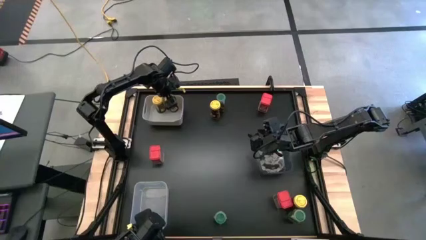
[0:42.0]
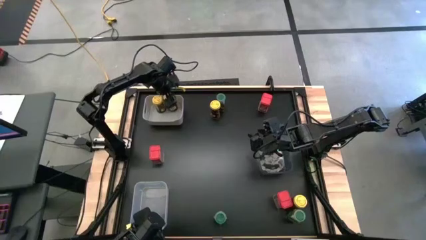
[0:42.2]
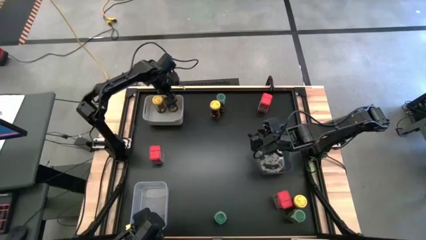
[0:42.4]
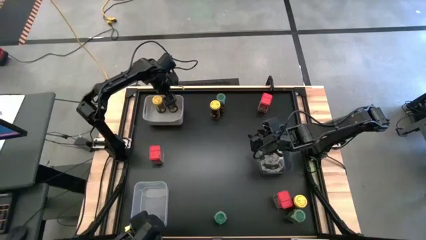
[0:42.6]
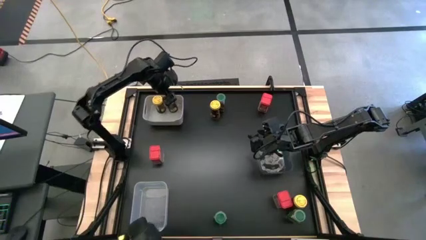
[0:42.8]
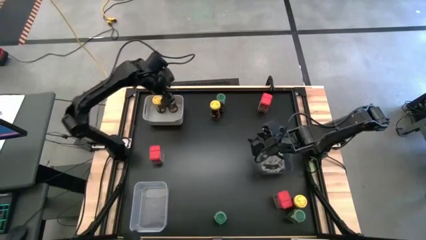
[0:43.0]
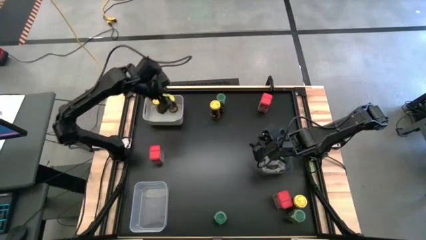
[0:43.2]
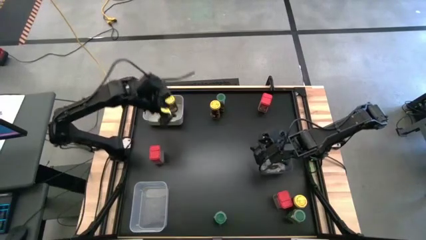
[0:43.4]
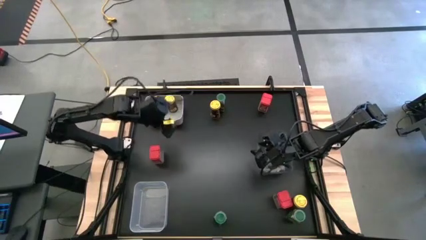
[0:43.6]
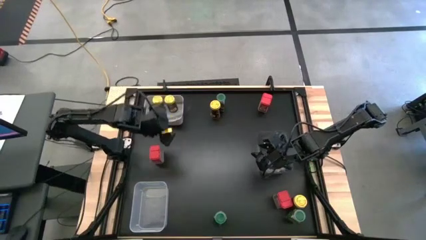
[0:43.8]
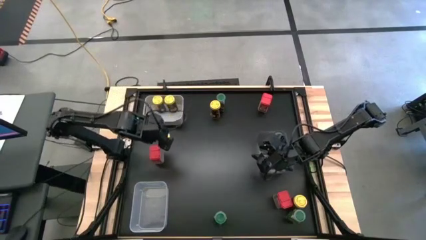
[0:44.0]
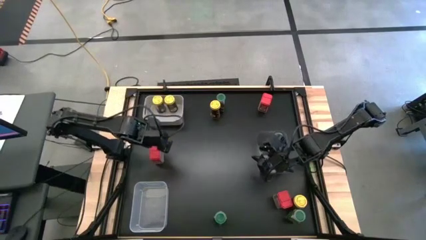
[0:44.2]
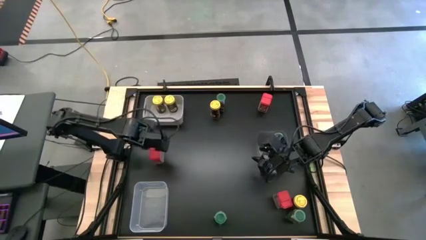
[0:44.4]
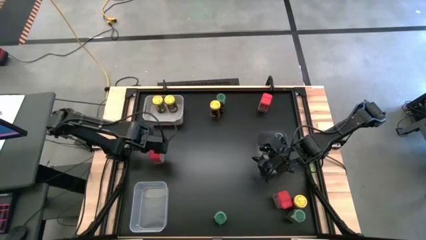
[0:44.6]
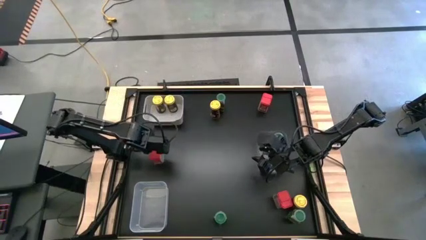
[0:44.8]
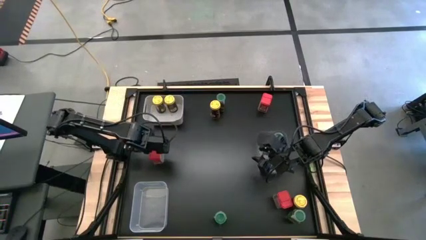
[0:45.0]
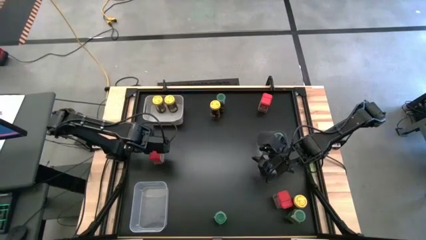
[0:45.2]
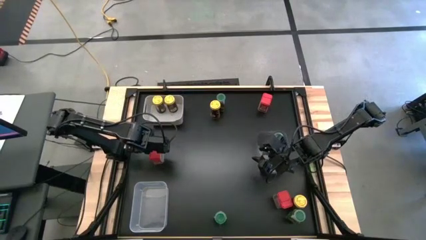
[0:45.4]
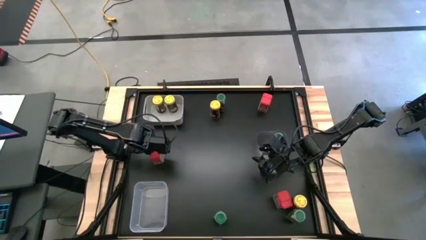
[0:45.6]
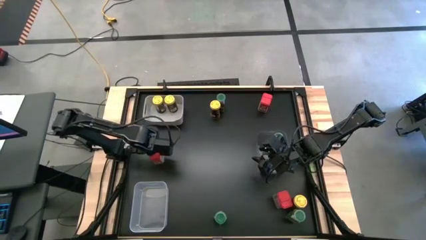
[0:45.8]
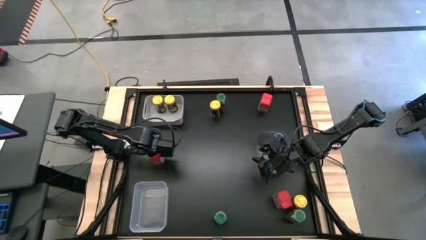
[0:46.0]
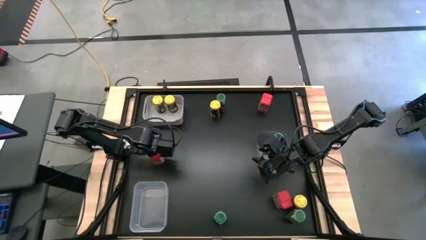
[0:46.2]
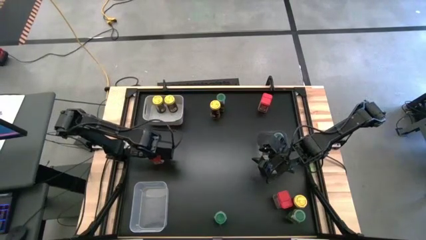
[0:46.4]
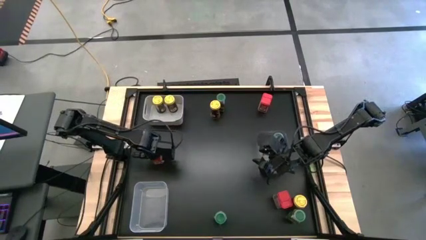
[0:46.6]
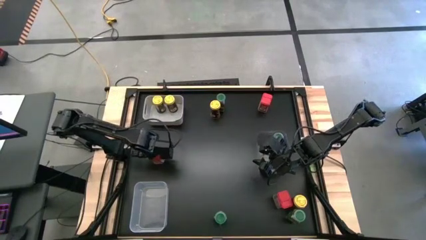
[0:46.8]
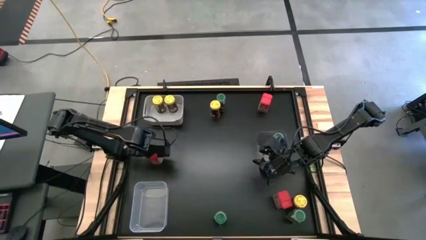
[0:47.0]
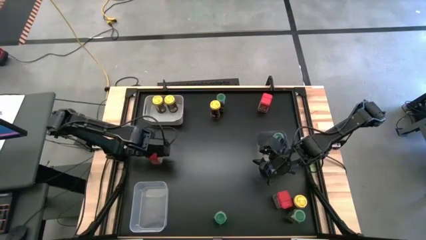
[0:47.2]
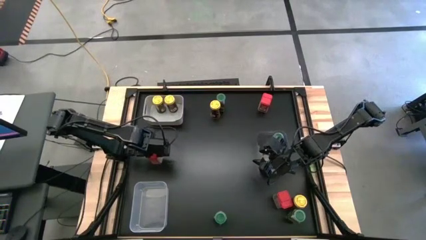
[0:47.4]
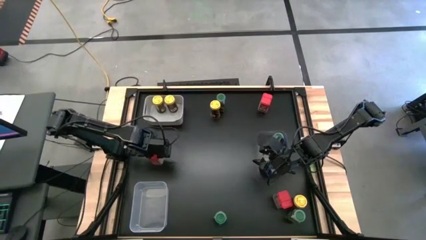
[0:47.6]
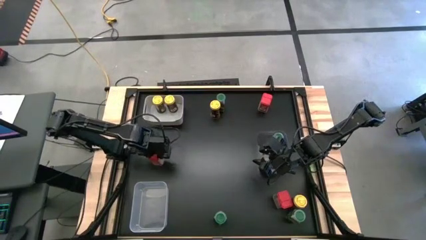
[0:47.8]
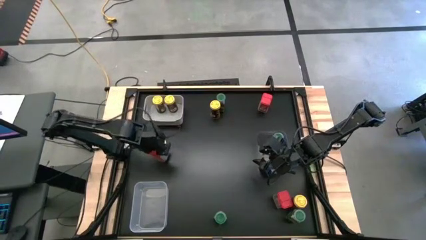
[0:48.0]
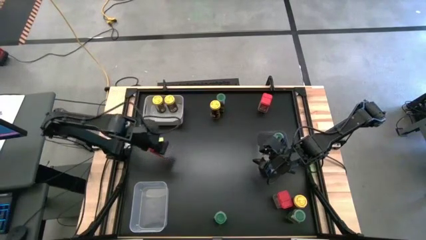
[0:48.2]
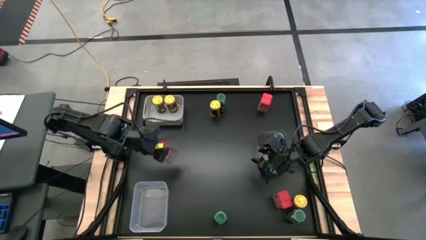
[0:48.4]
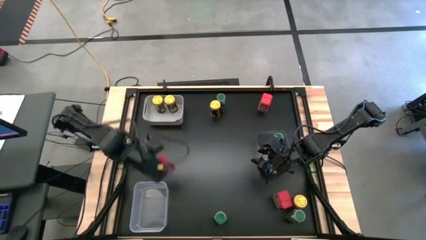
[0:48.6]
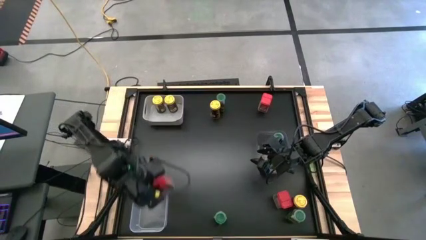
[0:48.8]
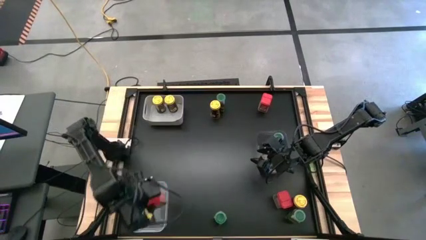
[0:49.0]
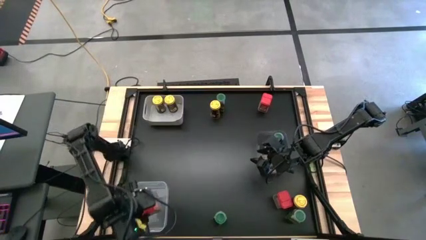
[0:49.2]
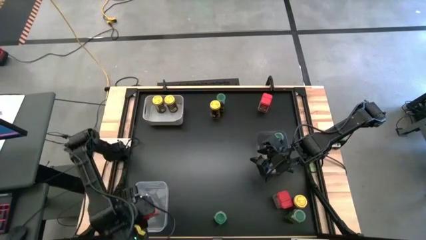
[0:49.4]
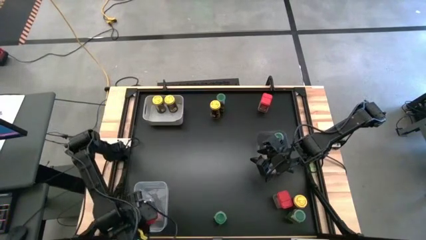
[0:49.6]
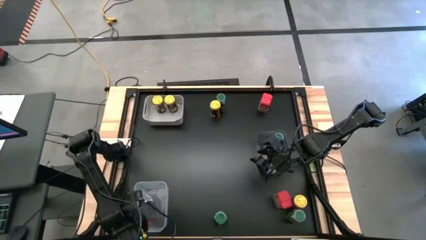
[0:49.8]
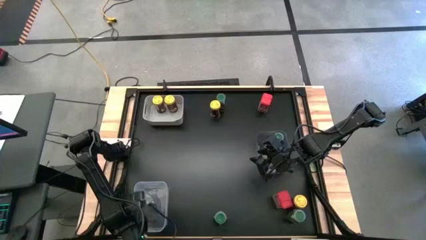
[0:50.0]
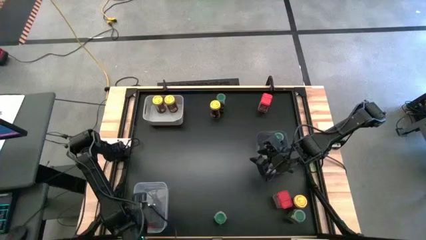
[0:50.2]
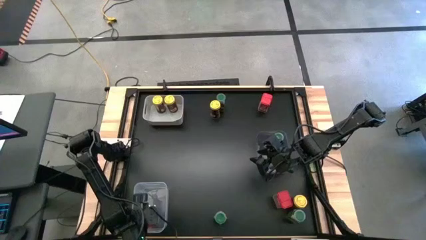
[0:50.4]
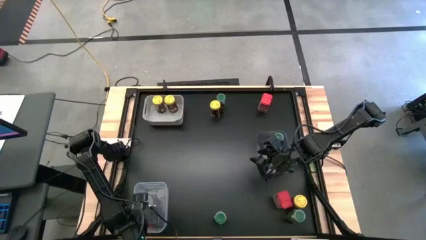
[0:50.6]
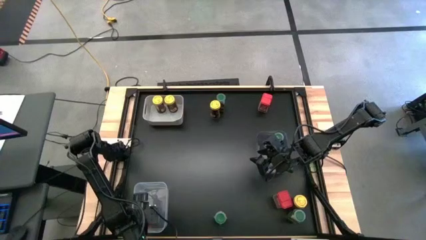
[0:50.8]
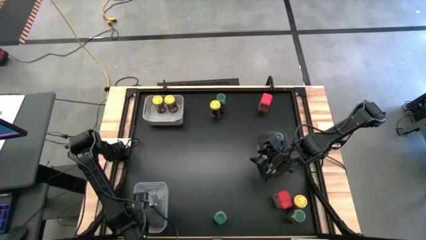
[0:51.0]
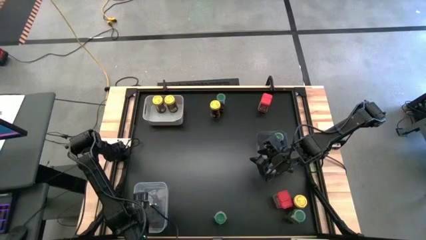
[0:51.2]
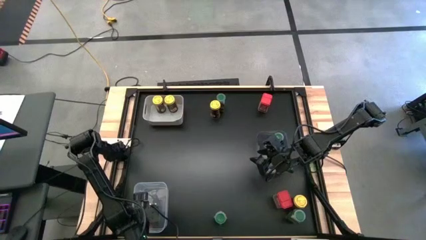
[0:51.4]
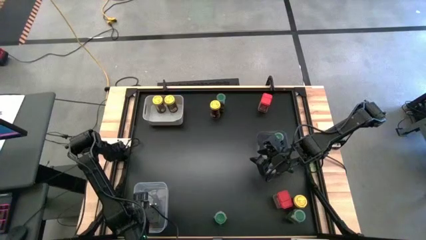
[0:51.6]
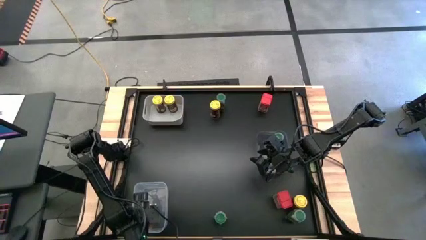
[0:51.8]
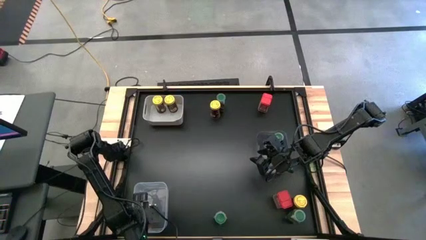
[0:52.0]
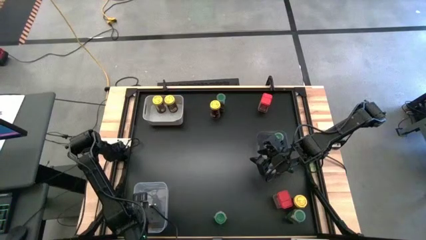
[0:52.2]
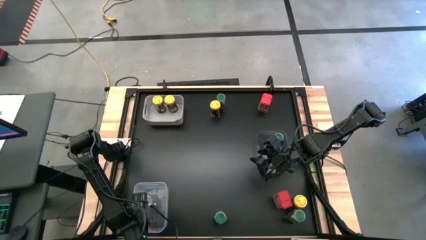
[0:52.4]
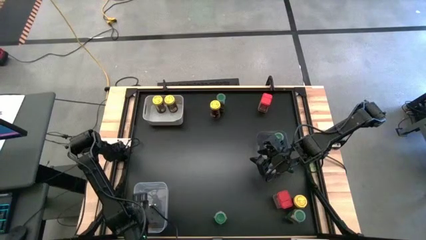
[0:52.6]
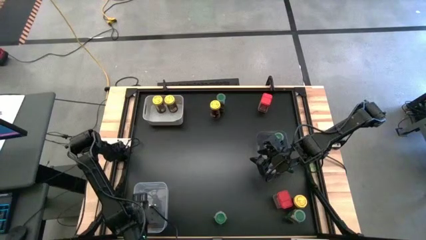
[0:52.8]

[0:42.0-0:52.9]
Task: Sort spices by type
Put the left red seasoning can into the transparent bin
